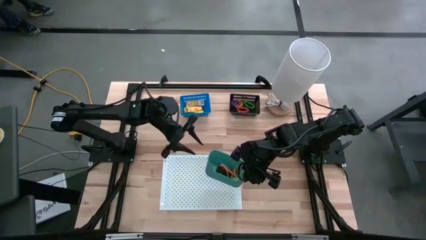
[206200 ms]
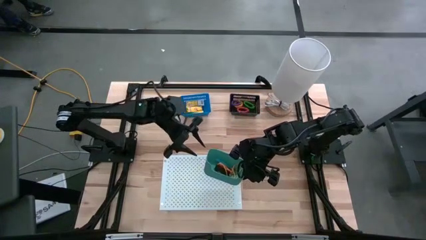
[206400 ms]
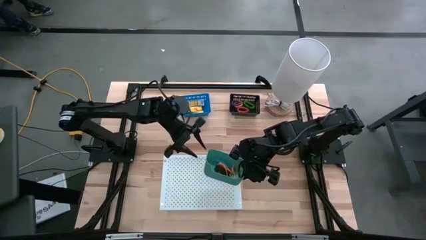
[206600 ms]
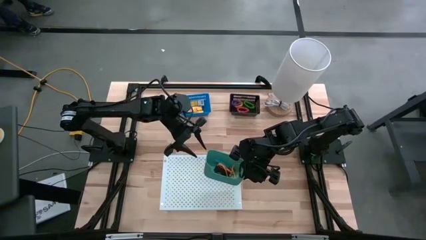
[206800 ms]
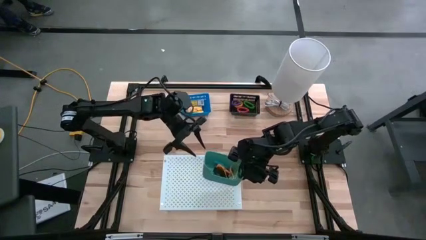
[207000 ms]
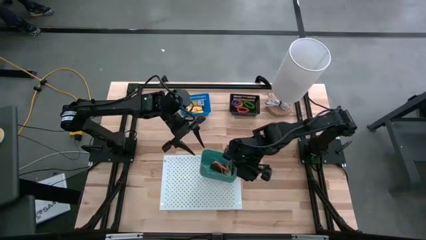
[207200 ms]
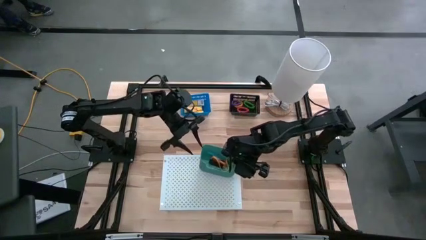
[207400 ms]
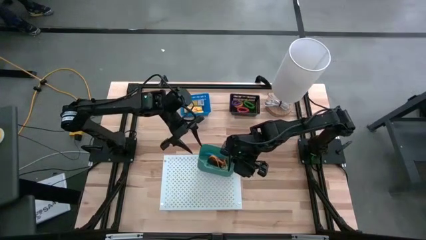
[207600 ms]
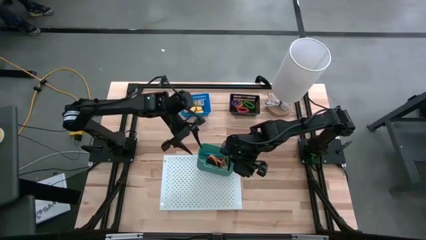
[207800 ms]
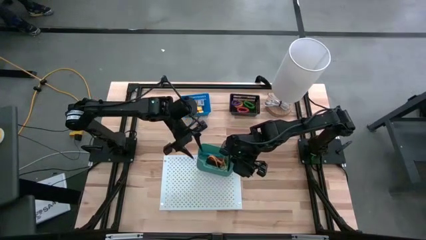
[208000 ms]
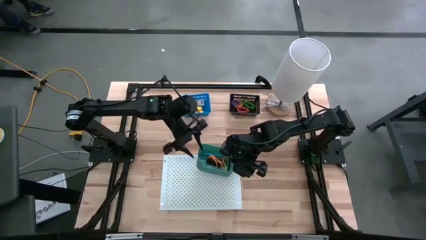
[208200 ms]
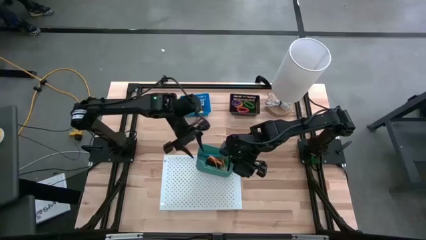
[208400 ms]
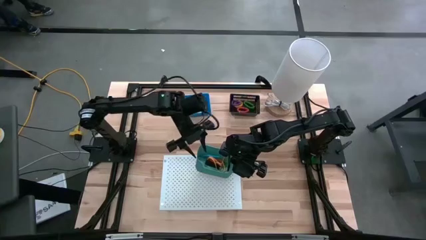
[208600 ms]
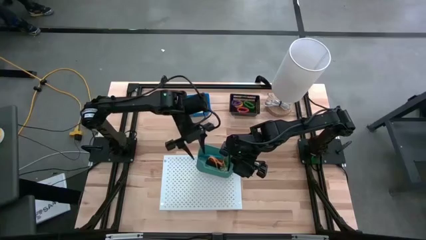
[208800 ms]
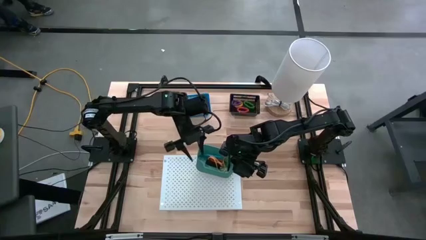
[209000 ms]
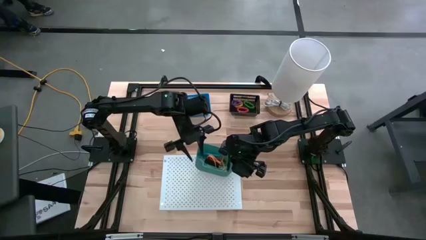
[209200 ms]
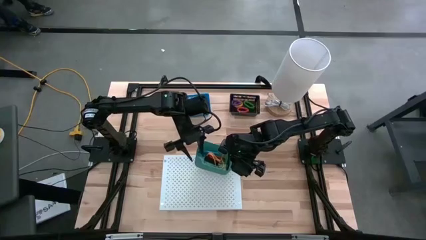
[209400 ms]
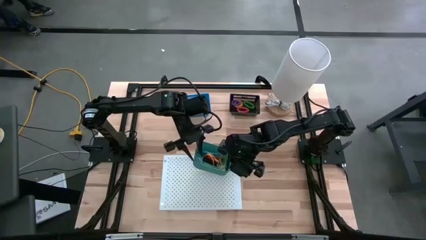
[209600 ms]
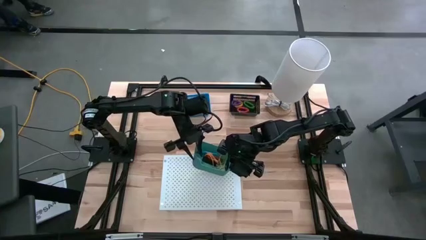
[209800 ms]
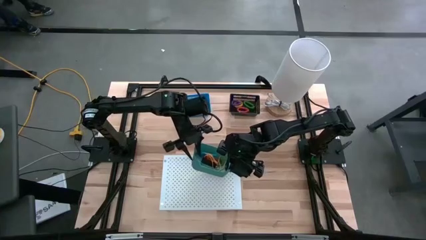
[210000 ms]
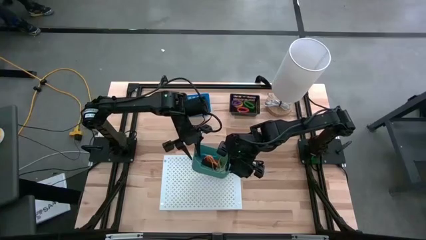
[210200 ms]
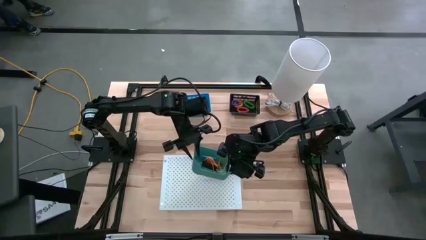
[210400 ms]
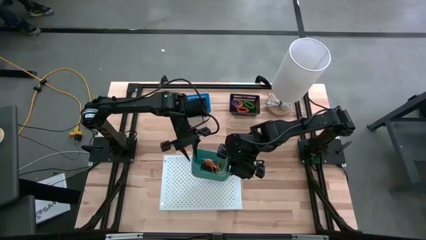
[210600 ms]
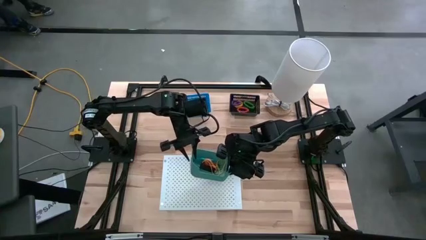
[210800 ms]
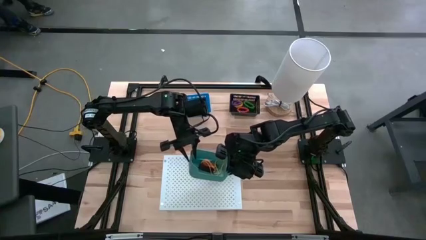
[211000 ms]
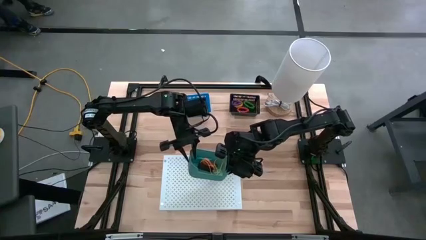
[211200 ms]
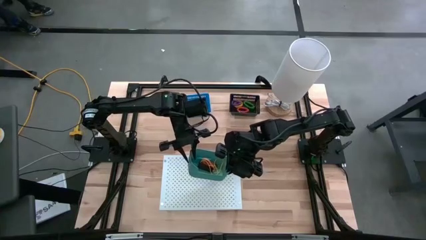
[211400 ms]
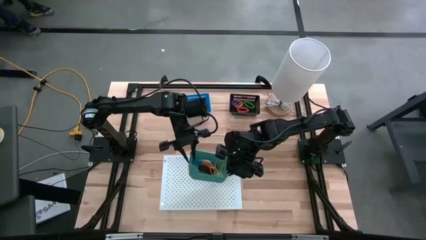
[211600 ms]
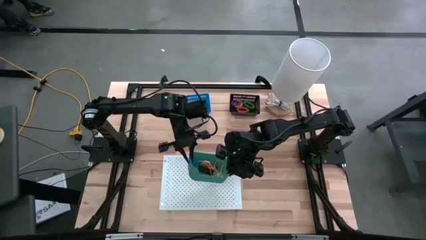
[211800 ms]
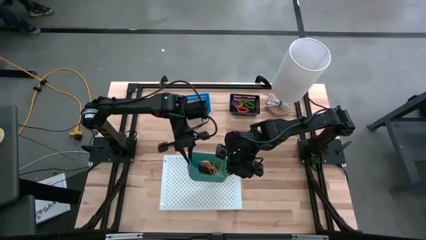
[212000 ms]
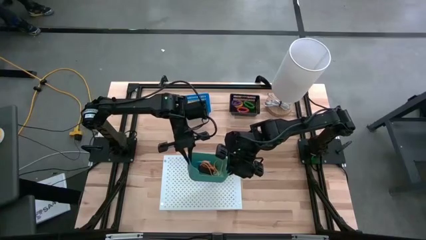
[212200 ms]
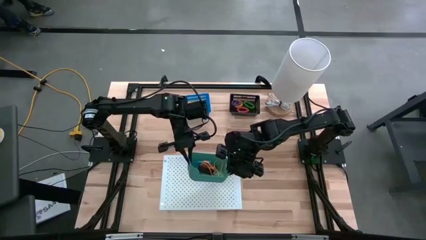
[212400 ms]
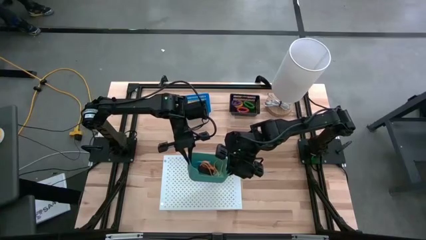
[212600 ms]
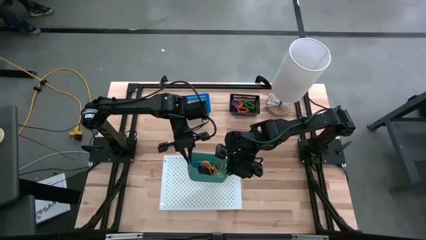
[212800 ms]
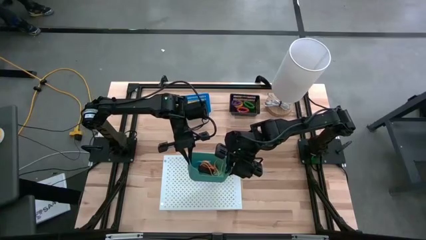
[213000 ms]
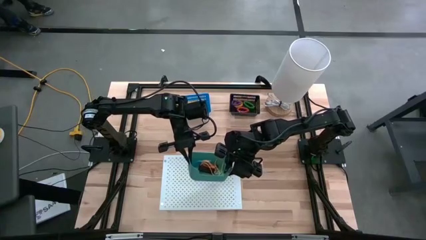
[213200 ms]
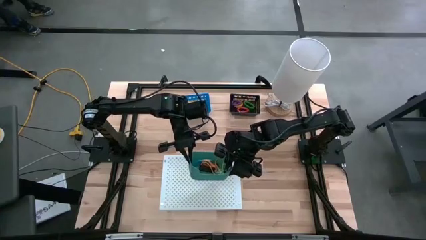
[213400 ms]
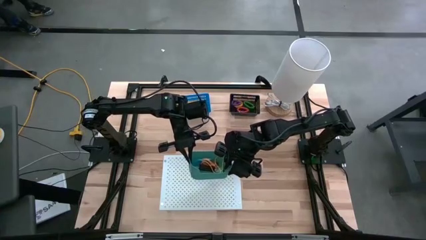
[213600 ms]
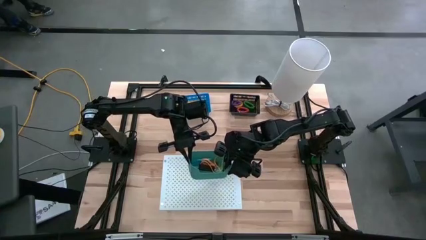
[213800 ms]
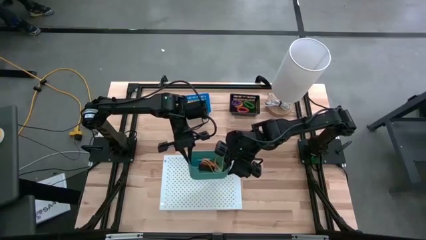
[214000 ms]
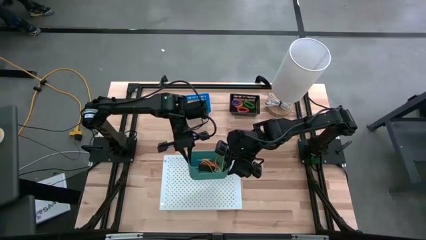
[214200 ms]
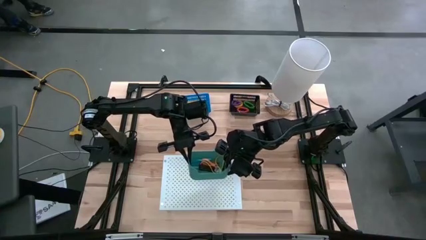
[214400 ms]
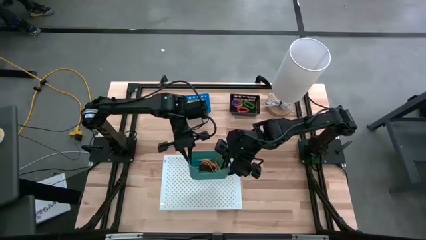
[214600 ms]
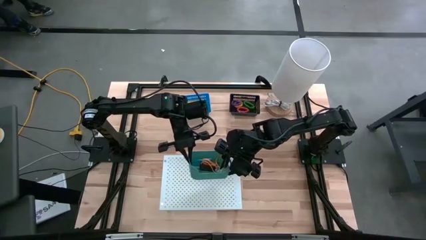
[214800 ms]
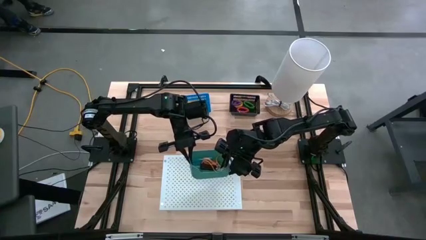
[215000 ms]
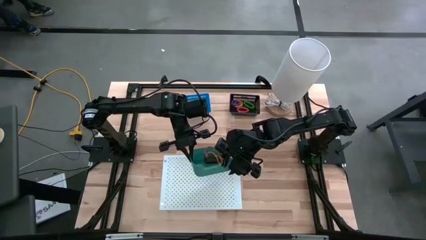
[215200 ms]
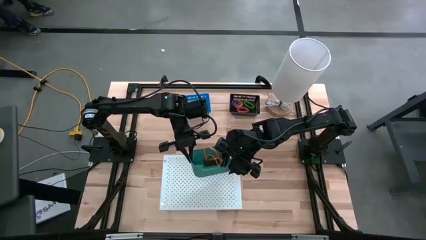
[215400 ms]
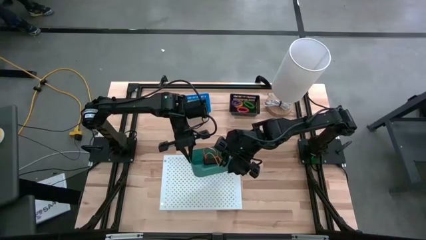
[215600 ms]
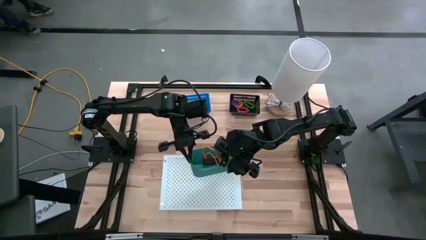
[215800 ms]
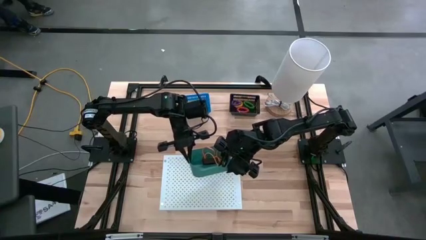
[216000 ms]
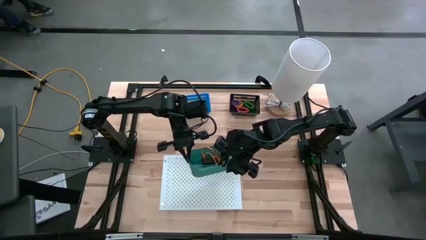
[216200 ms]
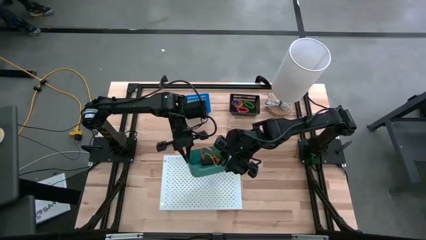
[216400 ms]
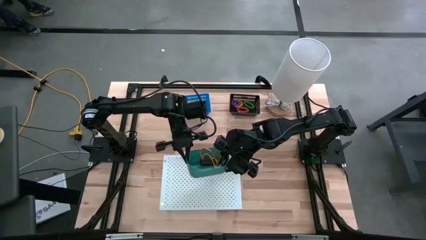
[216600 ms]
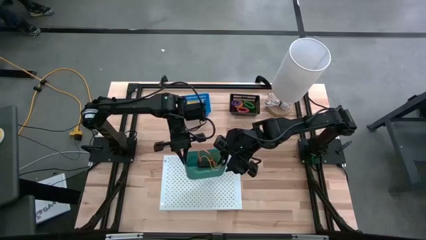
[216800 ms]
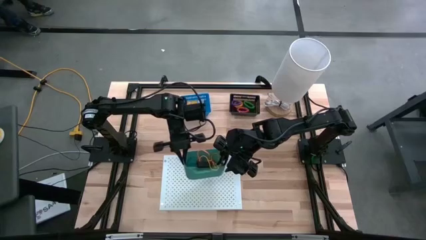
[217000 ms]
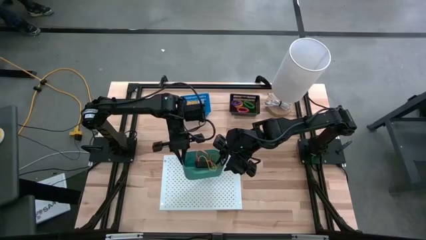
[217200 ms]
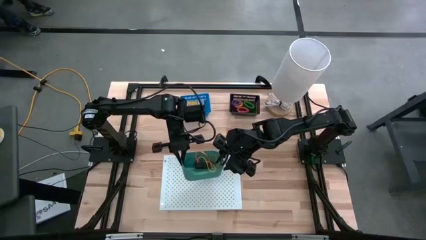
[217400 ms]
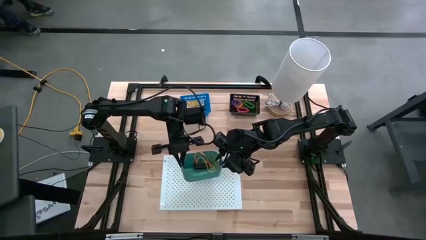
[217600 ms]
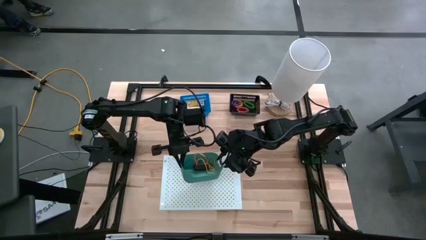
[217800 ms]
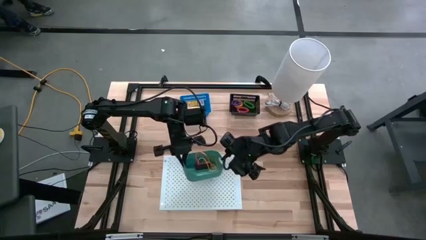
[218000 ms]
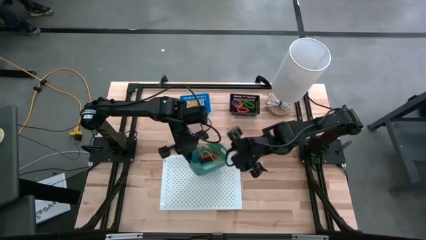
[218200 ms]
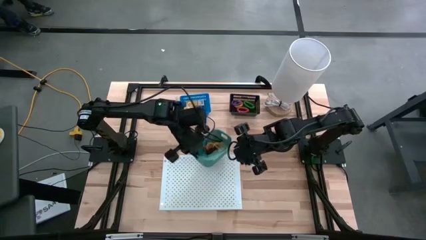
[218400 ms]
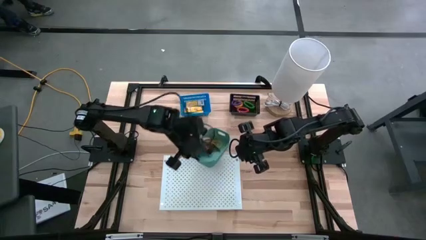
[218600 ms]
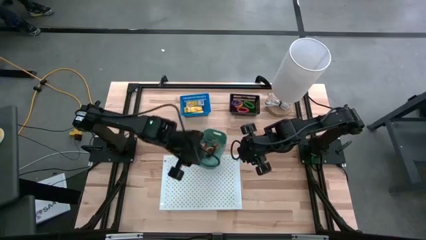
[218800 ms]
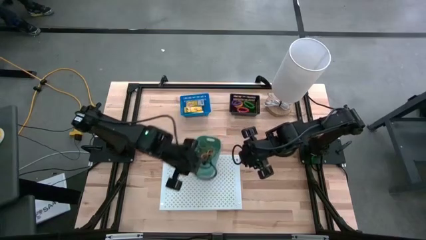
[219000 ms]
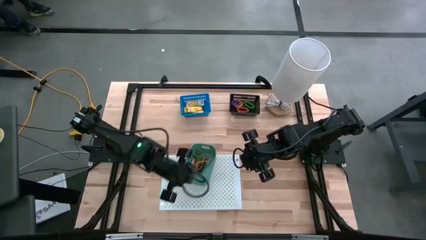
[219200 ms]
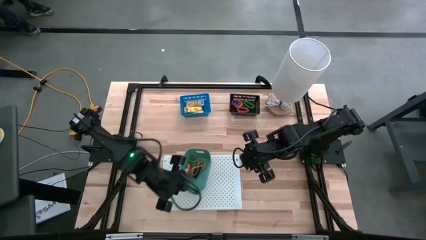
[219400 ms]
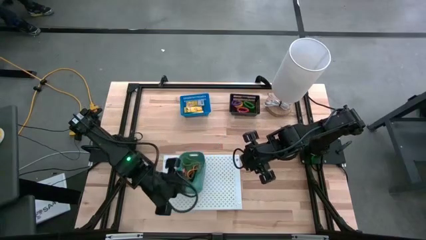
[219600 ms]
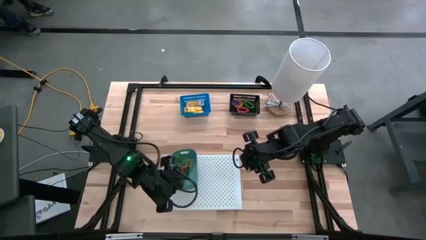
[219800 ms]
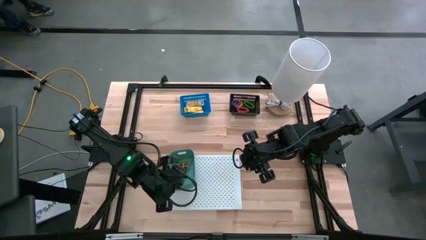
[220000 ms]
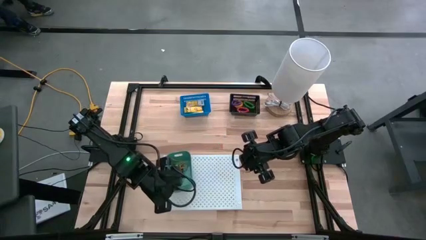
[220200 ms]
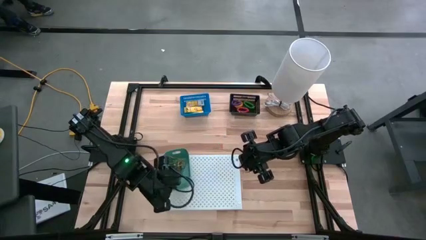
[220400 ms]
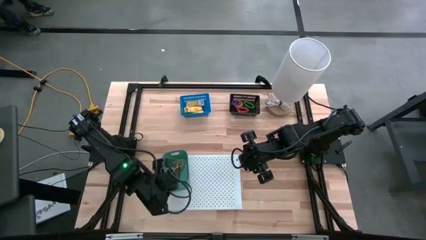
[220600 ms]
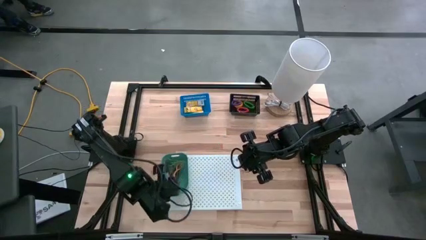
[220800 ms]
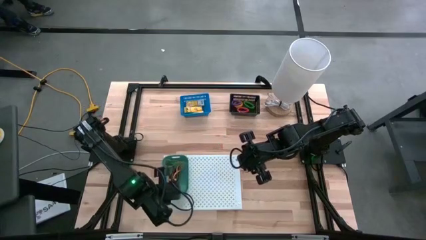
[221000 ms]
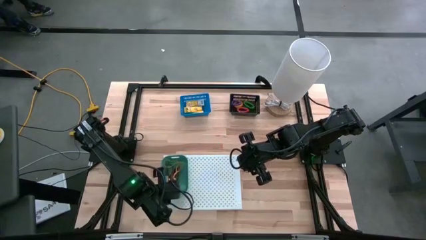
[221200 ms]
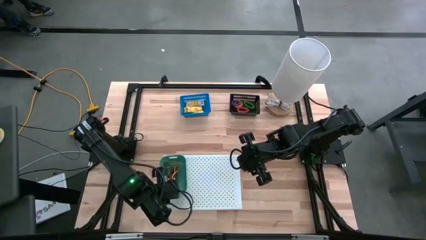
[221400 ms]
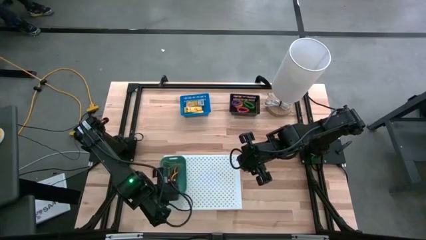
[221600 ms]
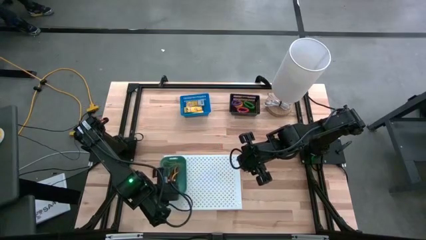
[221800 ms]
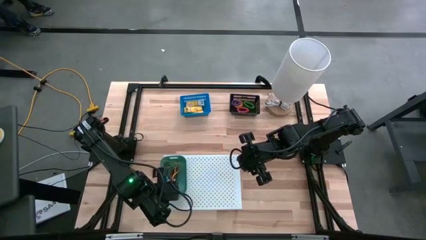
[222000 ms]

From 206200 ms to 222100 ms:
Task: Pick & Place Office Desk Supplies
Put the green bin on the shelf
